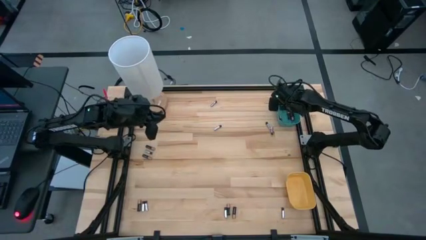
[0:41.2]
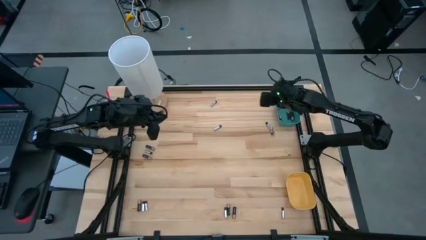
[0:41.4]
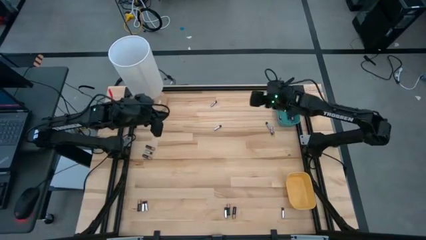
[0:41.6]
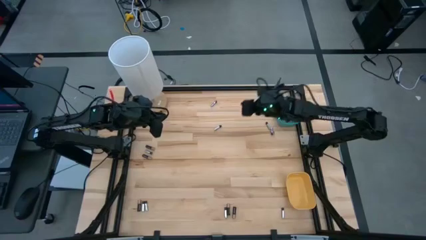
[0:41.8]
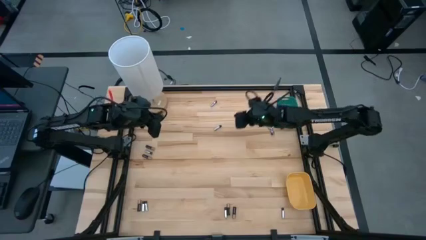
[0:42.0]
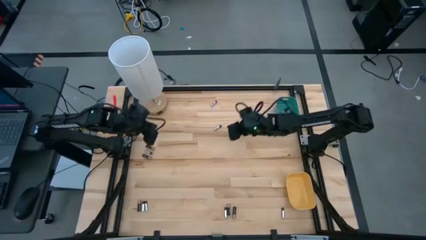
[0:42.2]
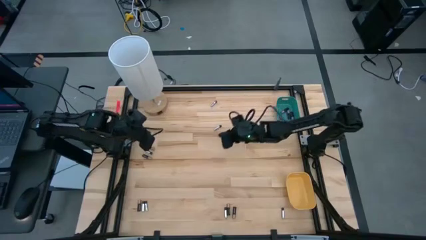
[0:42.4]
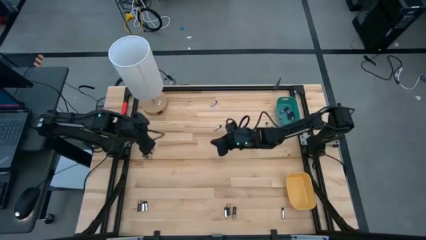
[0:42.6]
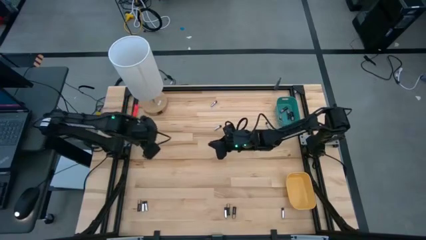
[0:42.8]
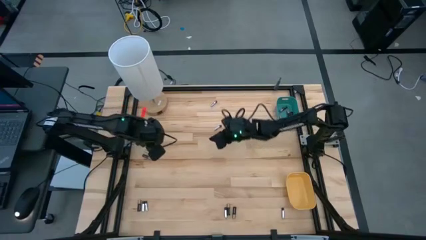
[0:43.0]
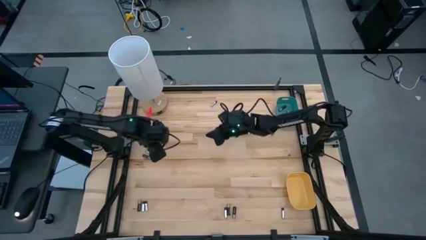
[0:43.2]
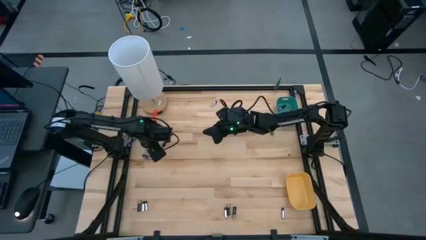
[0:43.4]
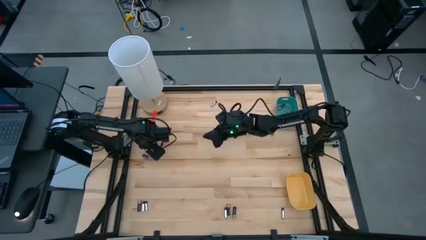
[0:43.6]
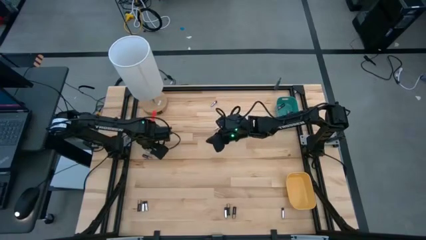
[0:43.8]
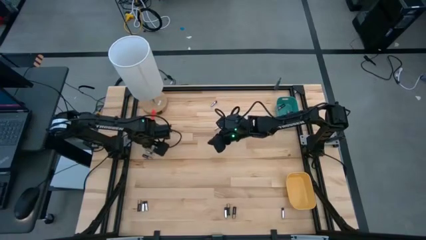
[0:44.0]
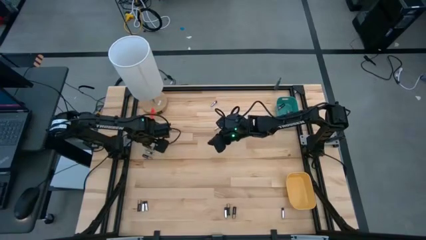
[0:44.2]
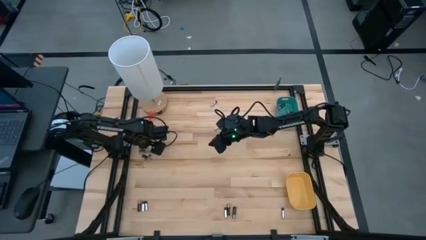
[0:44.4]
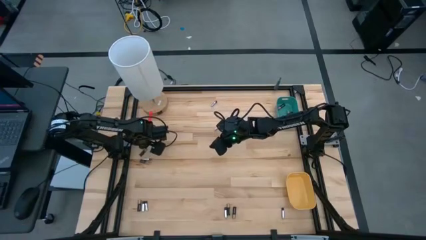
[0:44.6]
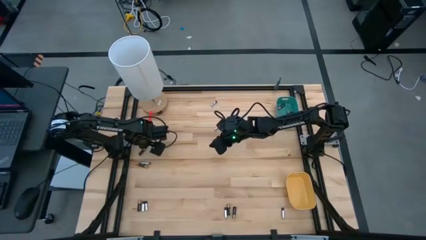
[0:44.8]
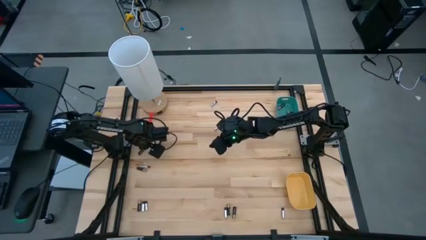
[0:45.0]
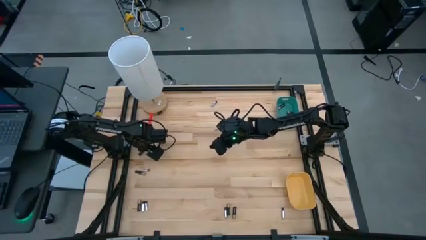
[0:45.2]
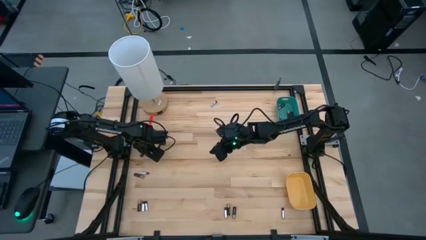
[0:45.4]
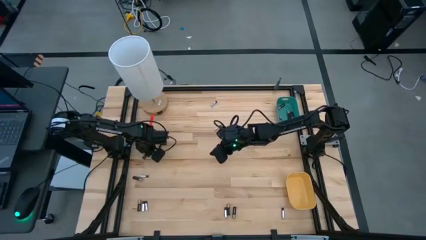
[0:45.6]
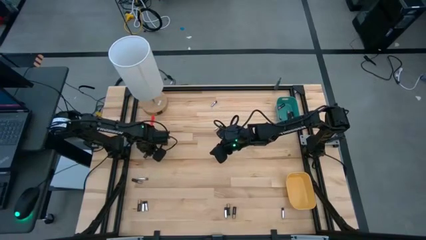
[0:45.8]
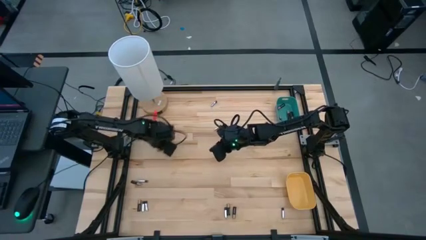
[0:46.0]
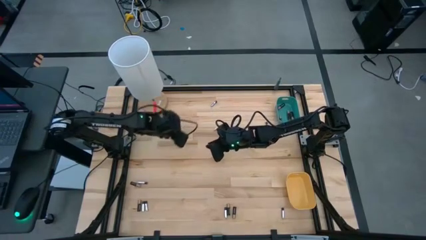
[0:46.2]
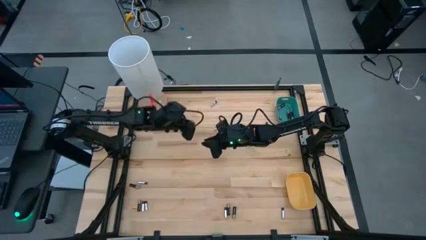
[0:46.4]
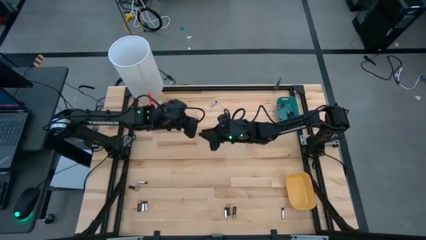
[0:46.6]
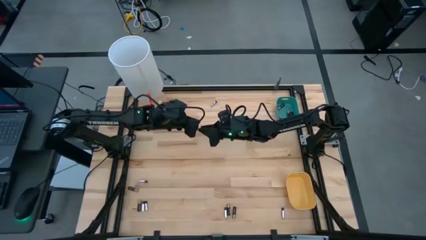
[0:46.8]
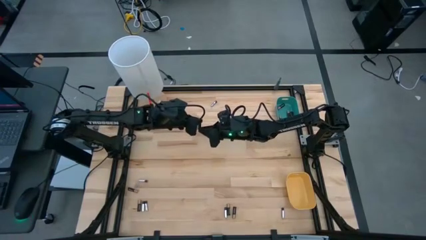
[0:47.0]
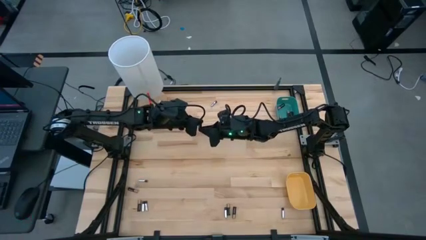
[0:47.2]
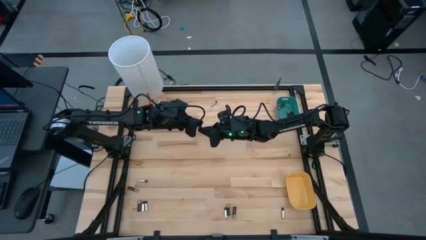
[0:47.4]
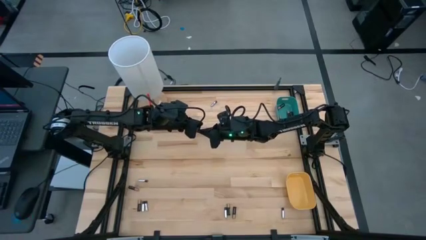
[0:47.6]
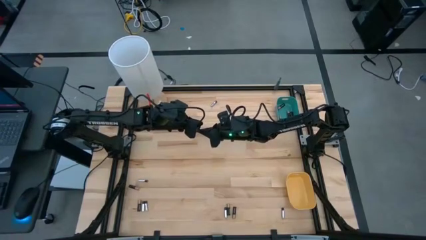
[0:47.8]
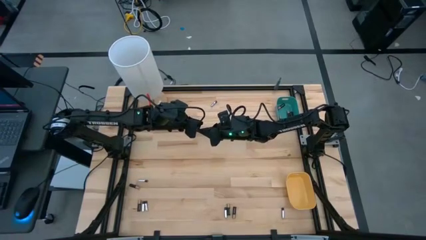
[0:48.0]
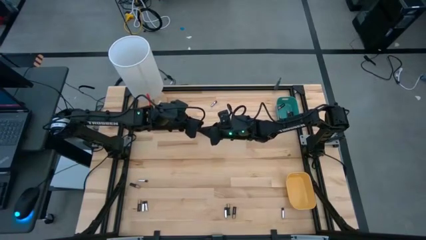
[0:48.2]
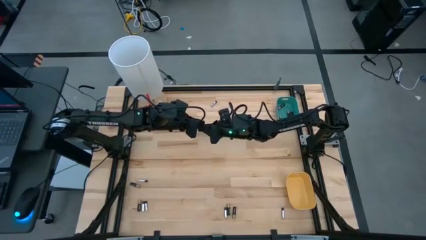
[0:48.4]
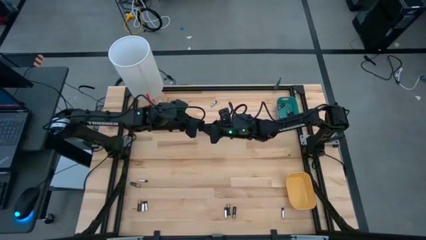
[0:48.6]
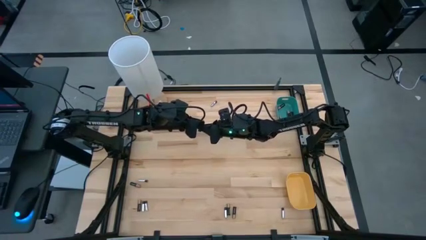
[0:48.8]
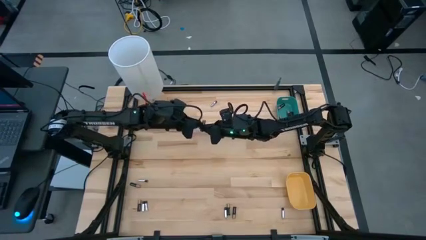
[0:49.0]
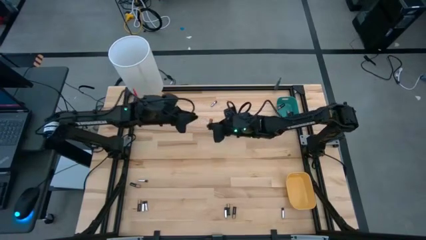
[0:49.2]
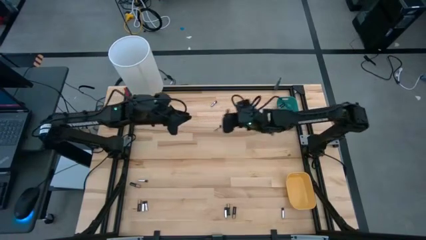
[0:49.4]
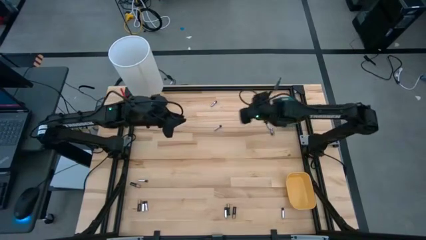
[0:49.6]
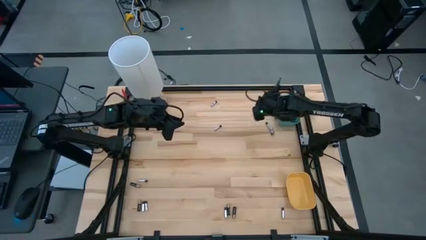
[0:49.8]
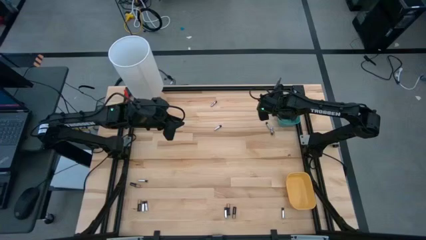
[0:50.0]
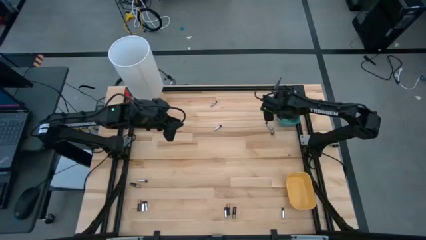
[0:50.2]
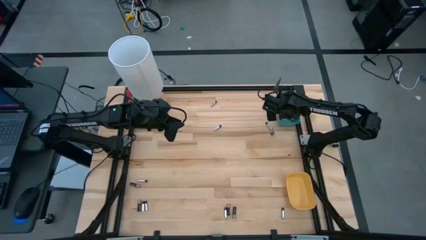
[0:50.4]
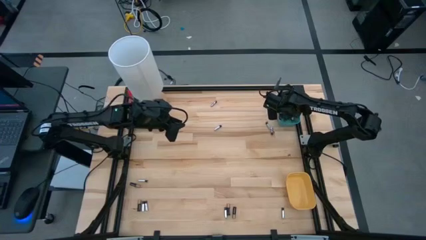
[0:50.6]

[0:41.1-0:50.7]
Task: Sort batteries
Put the black battery into the blue bin

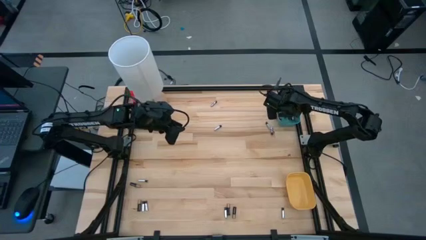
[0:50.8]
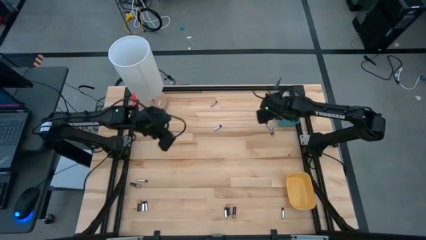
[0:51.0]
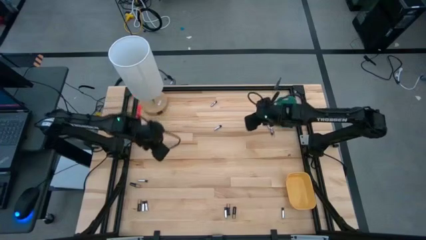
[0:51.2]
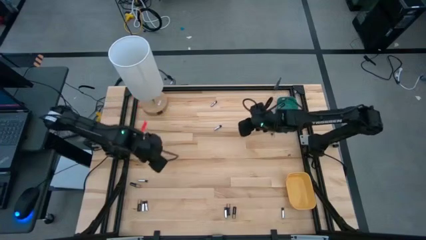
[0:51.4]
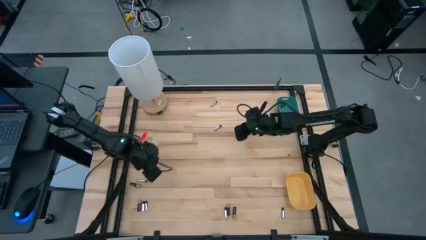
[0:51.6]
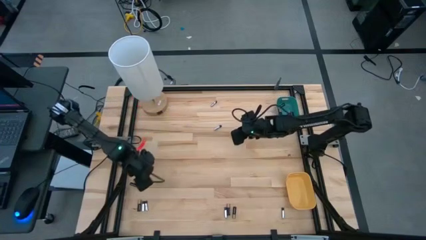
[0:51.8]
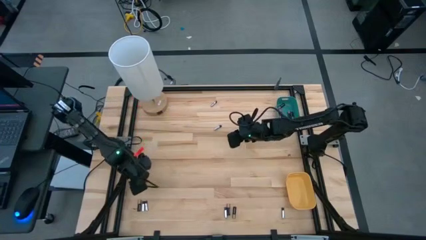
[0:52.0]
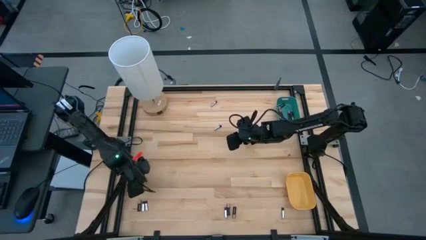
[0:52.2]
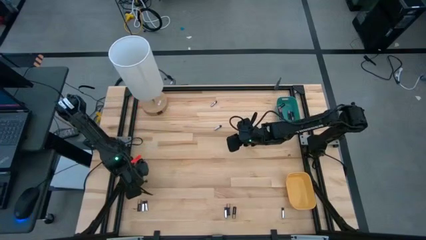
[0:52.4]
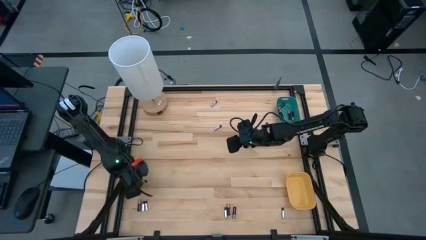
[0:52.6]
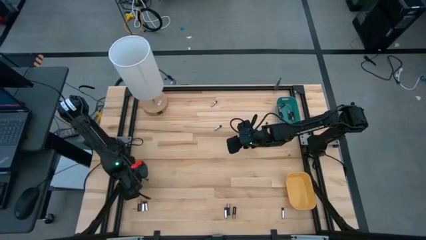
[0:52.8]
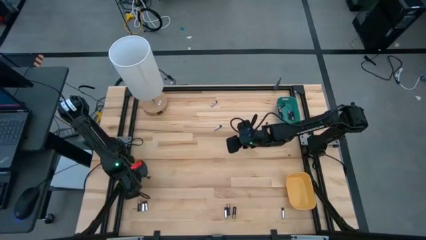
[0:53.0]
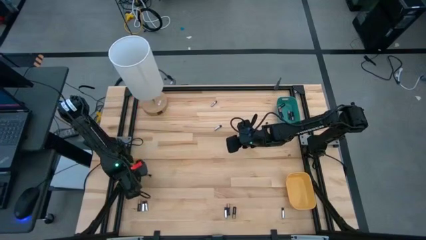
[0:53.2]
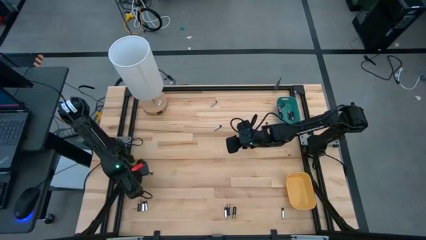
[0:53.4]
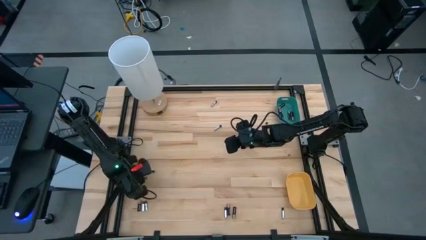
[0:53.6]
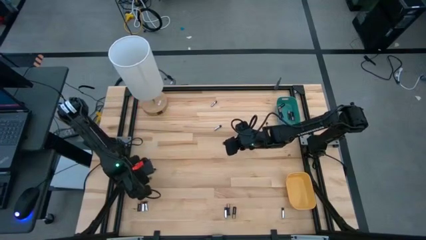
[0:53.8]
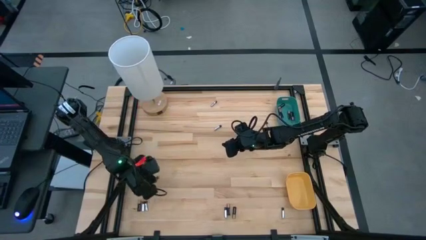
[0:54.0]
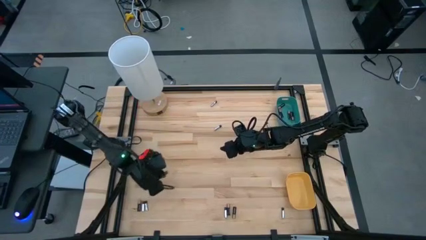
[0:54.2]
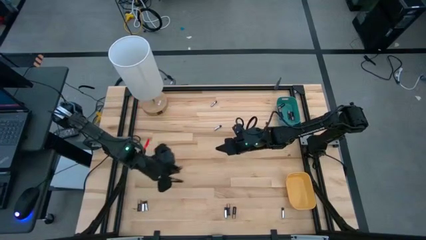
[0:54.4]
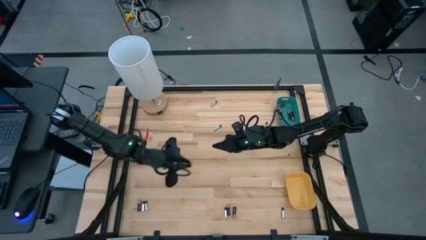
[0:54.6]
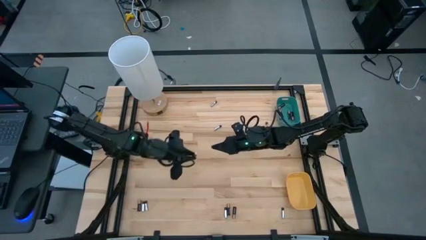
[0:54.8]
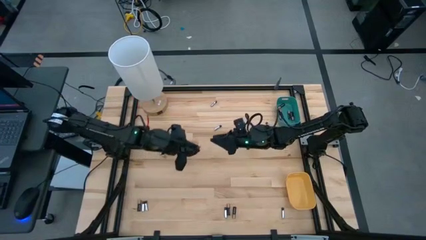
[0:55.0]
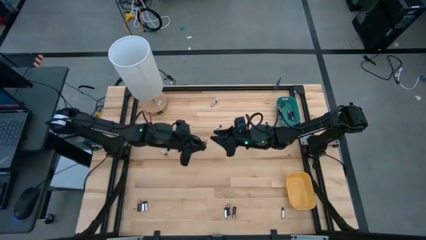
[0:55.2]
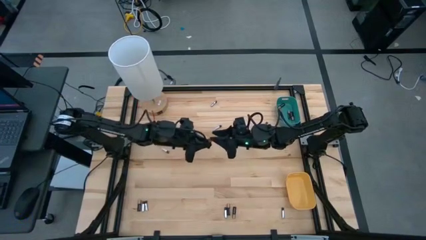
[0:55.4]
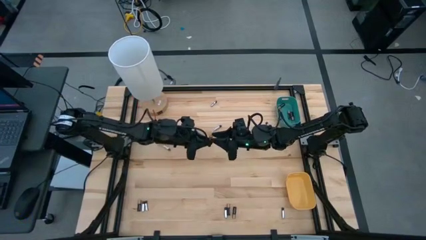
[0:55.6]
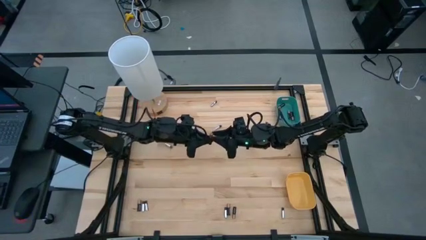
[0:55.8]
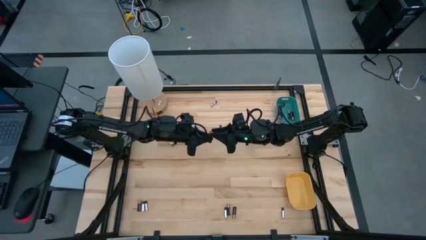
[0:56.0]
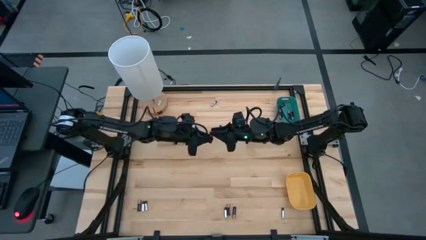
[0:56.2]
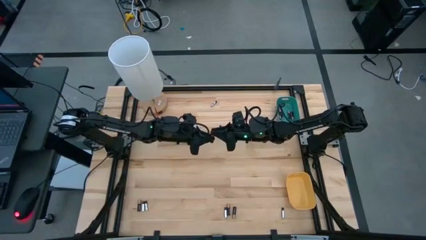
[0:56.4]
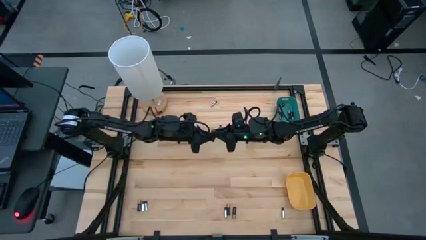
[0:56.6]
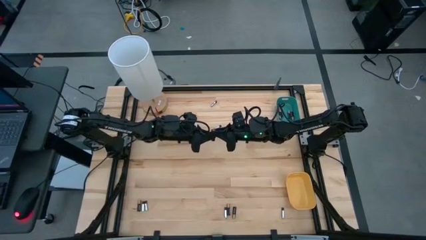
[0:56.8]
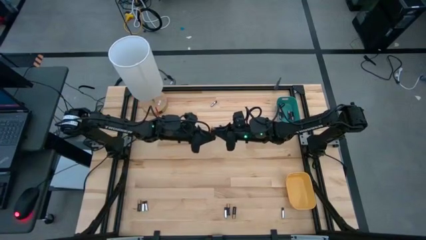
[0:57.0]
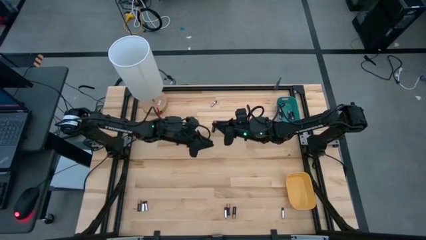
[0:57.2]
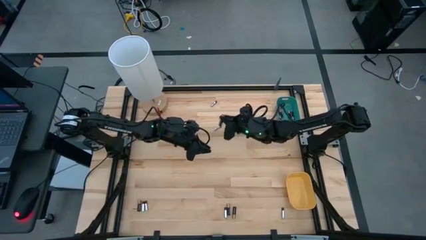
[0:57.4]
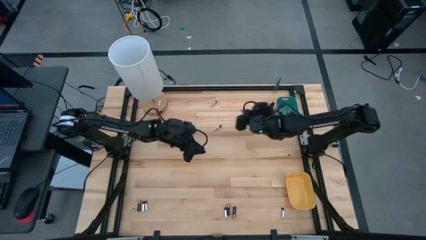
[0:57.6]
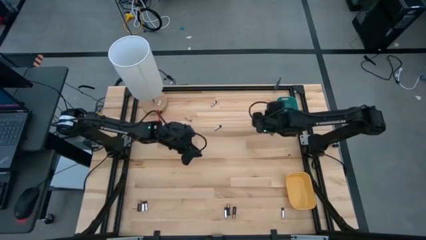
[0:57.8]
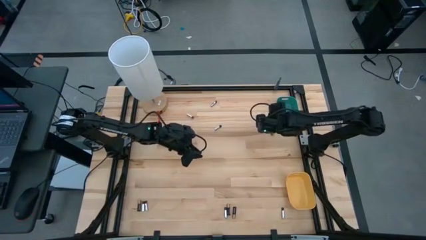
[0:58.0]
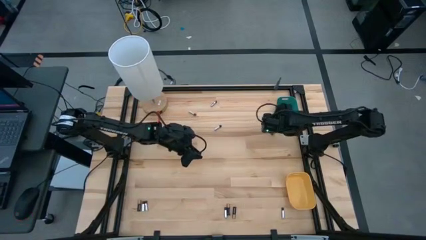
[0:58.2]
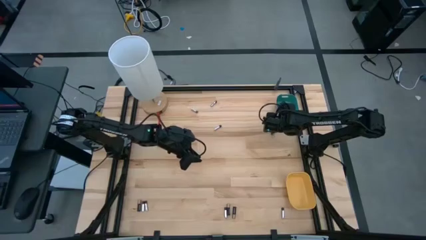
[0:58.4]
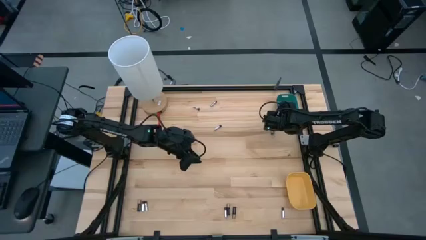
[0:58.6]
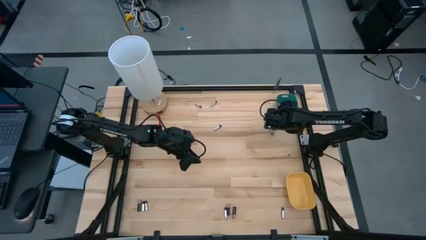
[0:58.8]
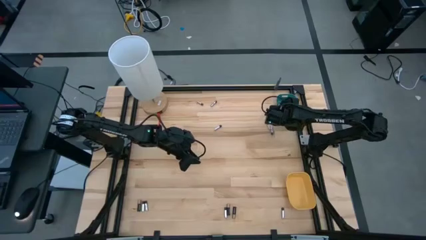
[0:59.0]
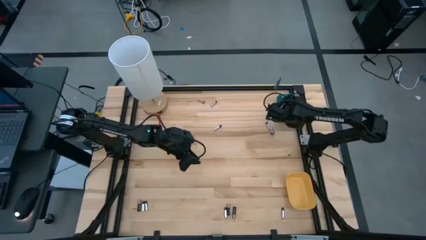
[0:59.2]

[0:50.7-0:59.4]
Put the black battery into the blue bin
